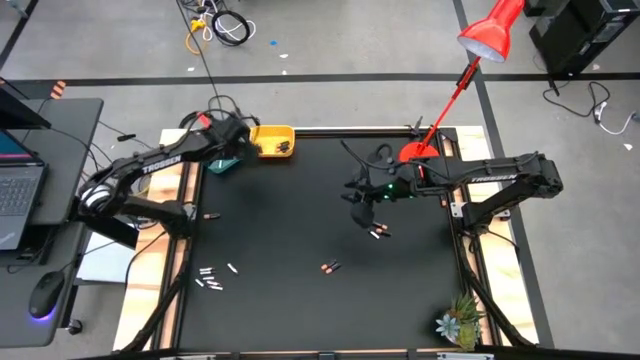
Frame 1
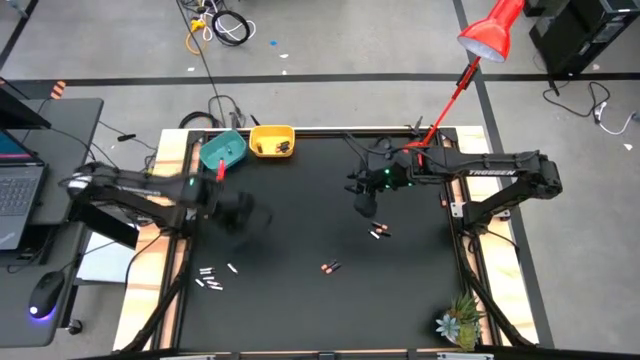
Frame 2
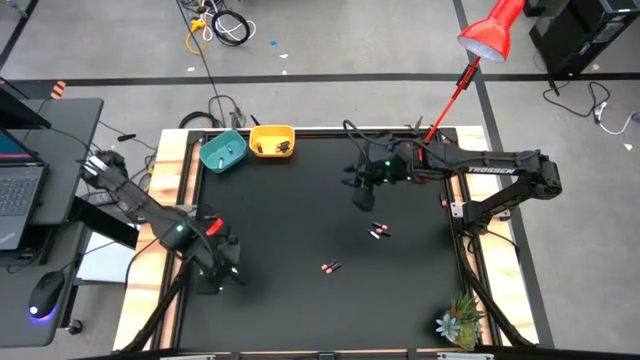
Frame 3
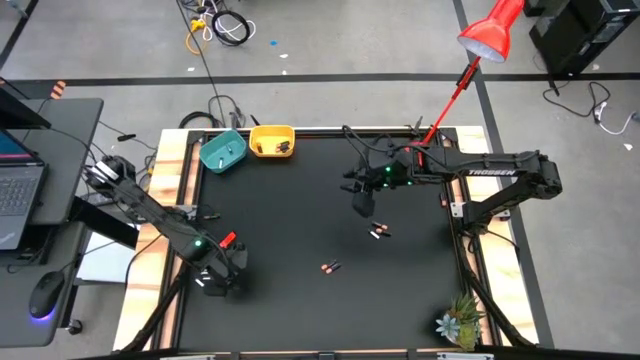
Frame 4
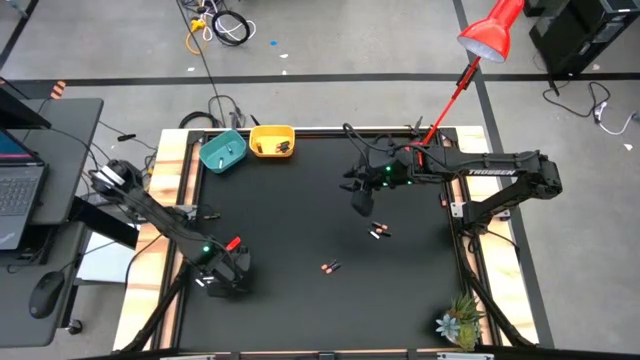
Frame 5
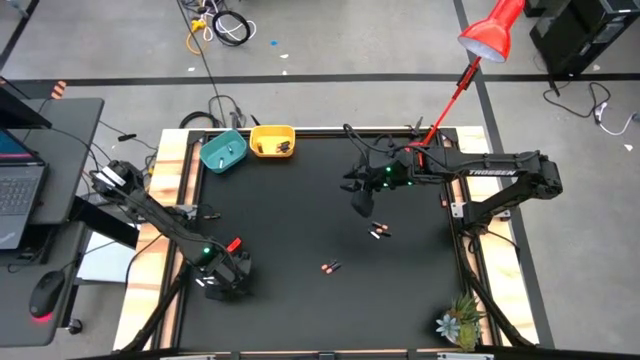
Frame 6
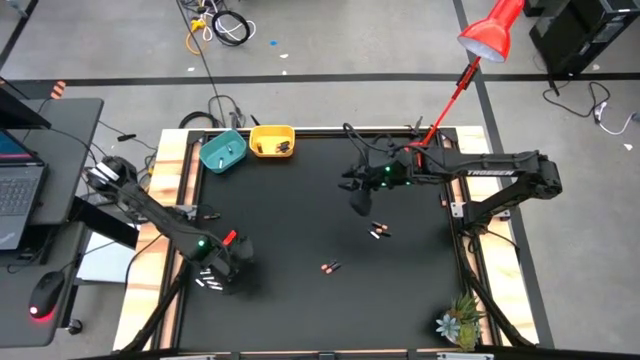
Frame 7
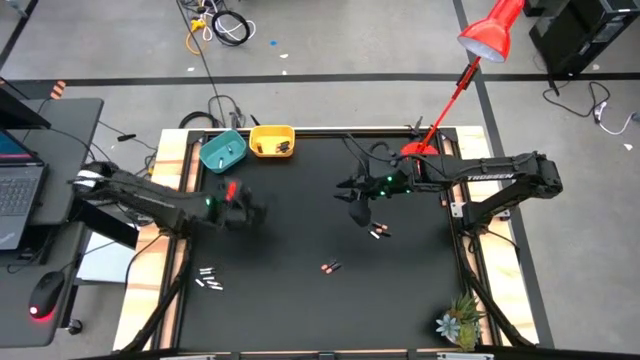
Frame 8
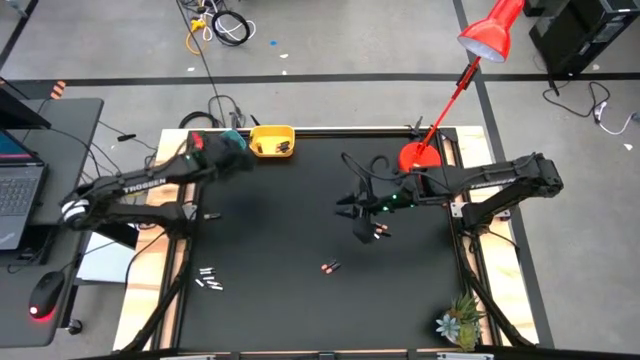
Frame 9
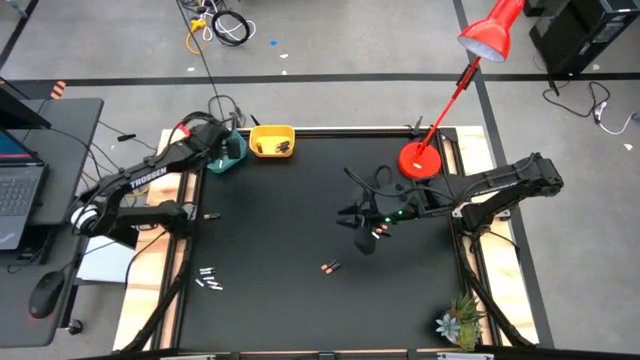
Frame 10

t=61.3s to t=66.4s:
Task: Sort batteries
Put the silver battery into the blue bin

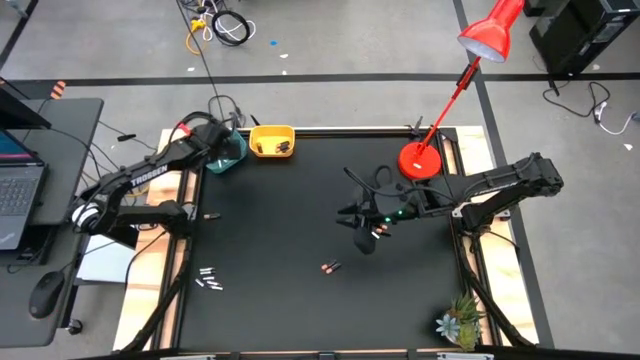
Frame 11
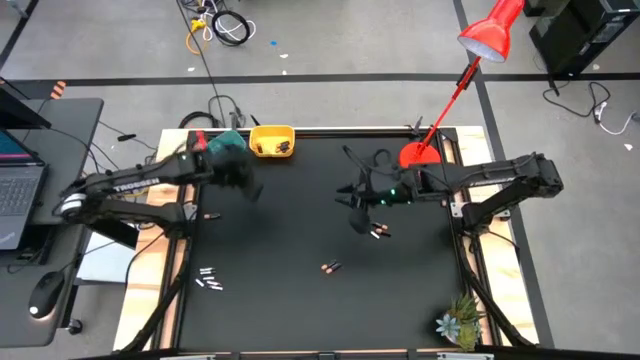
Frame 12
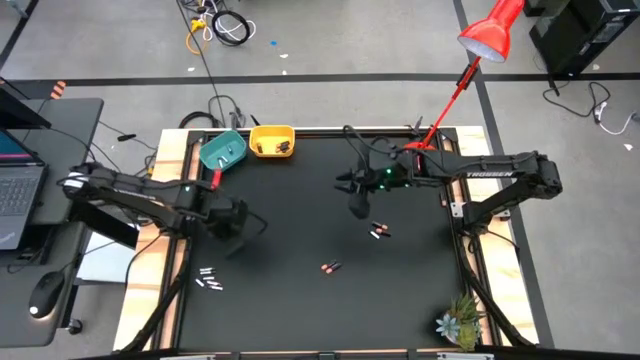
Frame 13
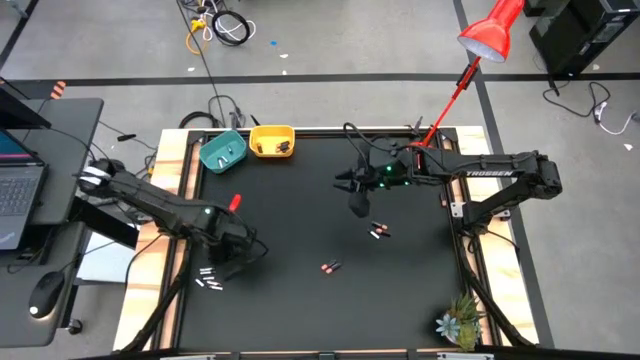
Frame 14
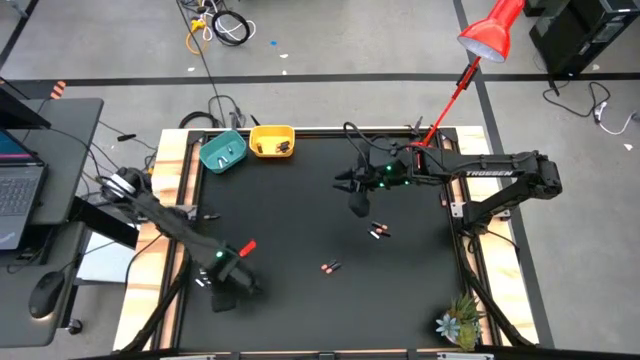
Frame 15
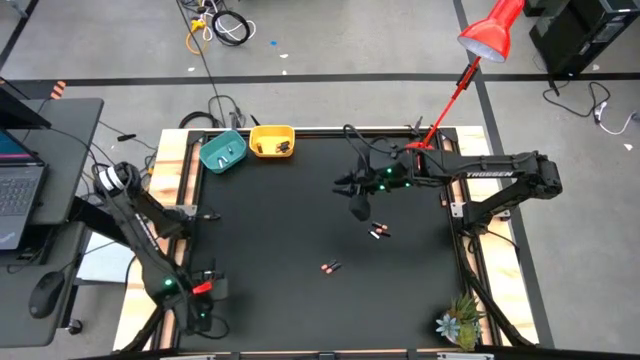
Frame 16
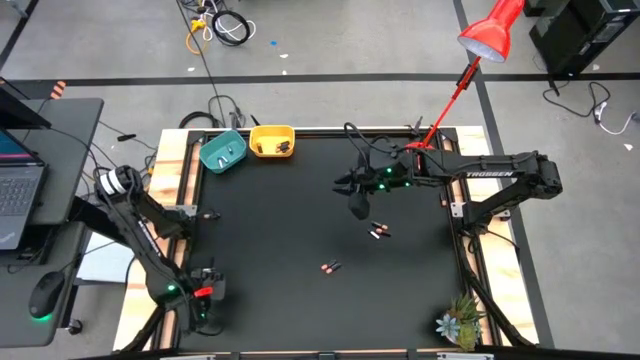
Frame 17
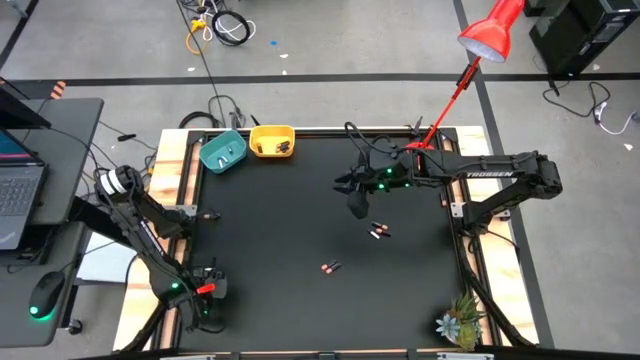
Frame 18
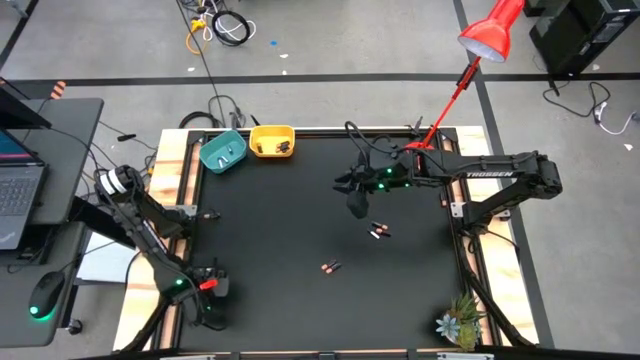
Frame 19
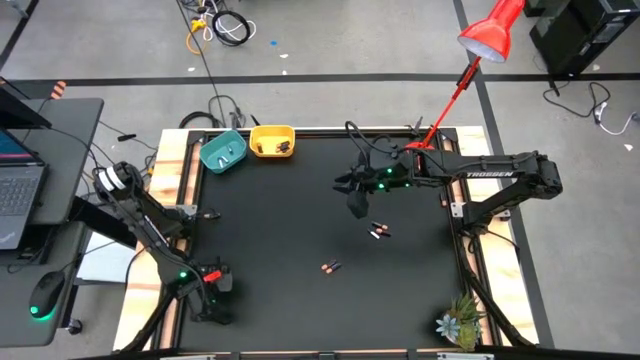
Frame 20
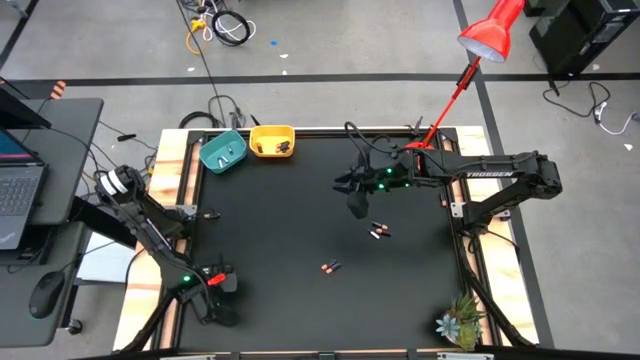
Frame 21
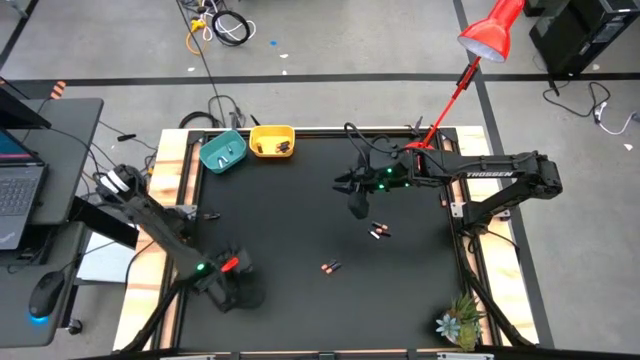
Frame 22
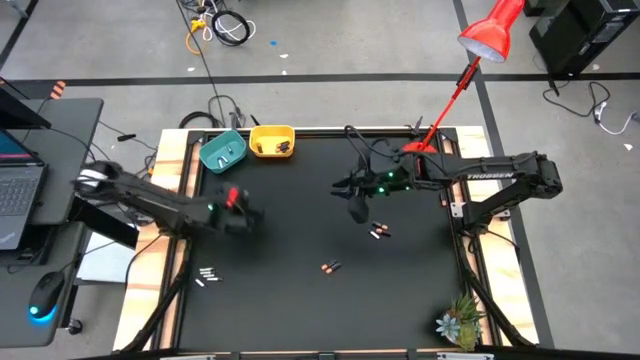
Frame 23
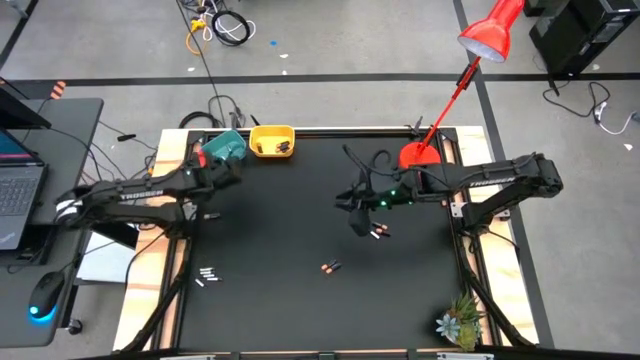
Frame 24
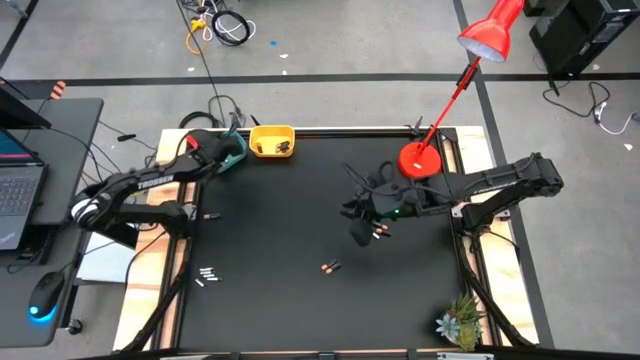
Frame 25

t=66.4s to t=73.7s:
Put the silver battery into the blue bin

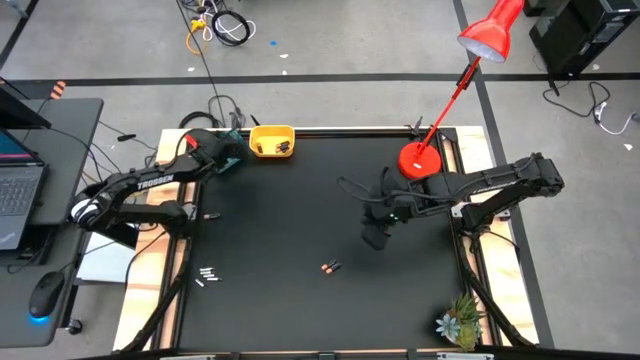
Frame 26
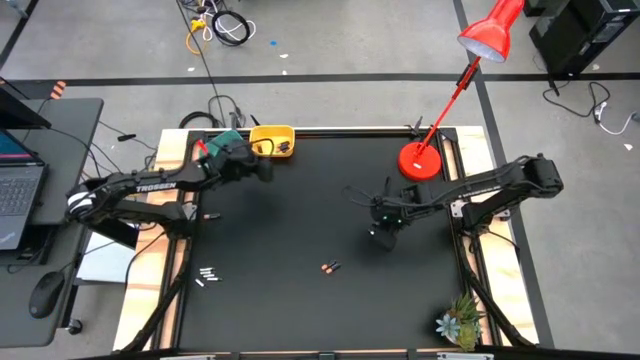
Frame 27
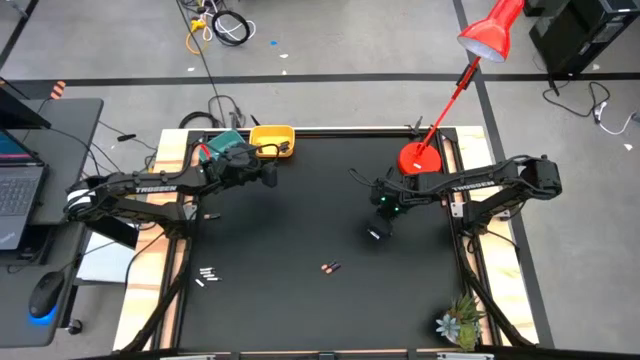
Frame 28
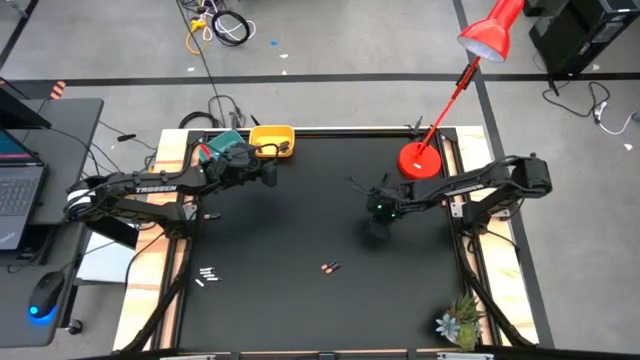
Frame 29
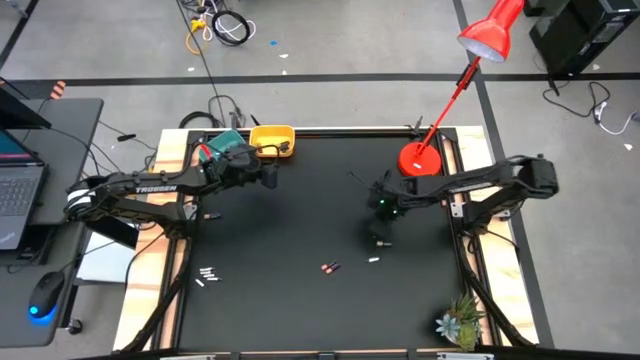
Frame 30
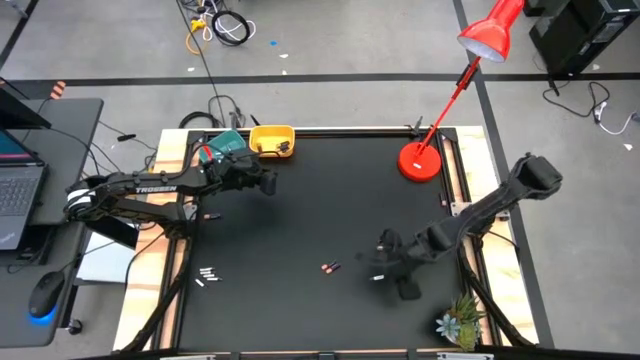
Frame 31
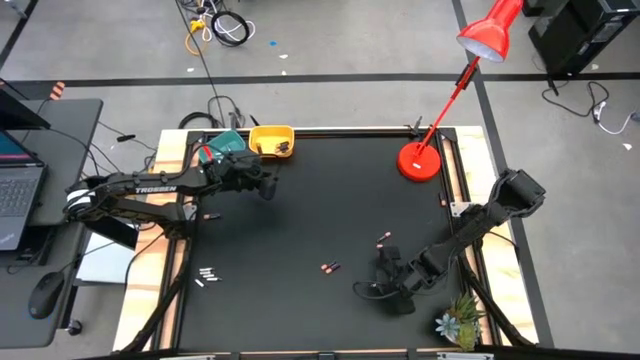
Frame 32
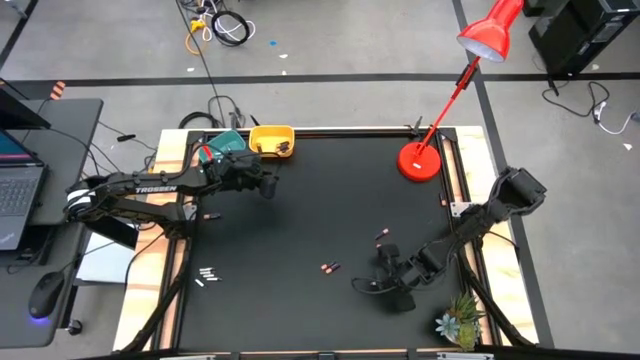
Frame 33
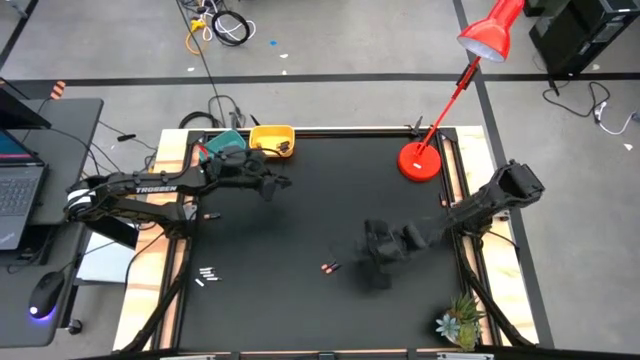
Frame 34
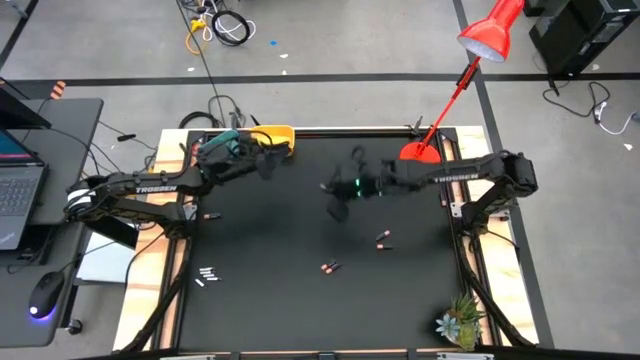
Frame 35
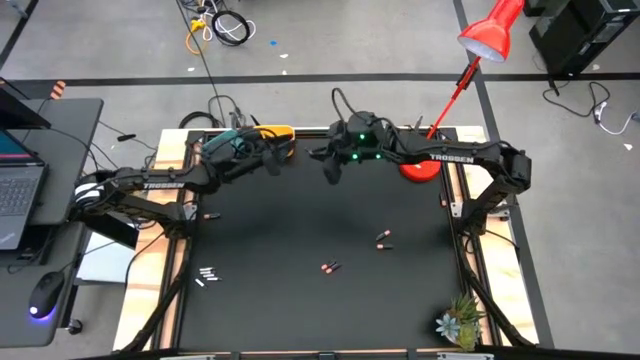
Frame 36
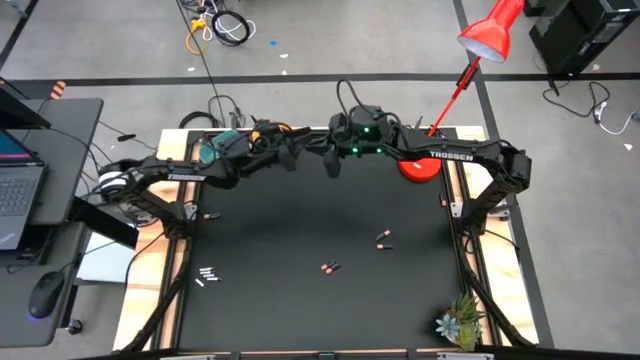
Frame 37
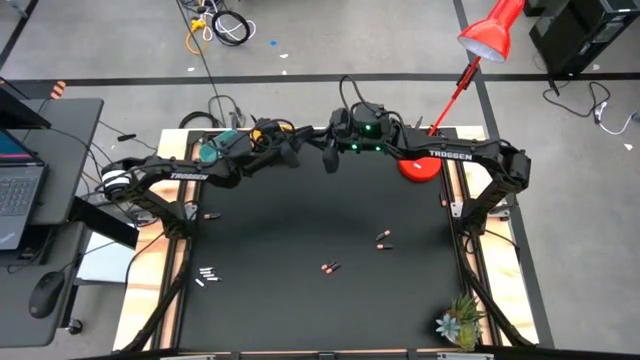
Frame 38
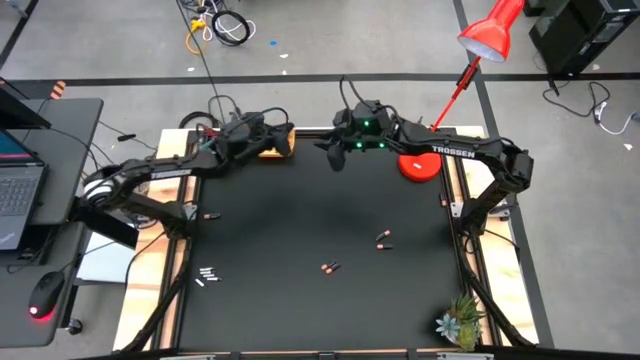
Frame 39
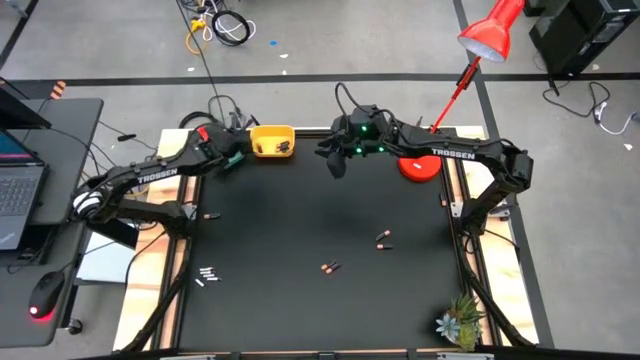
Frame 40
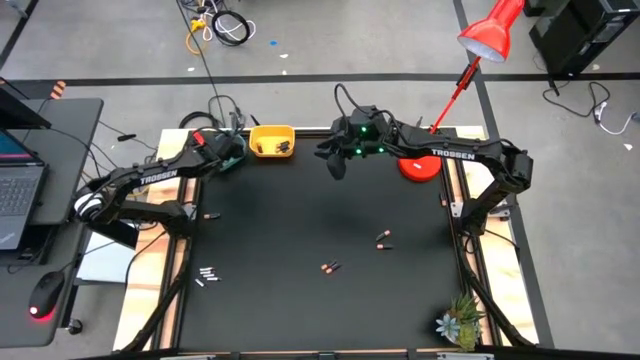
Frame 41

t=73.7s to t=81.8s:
Put the silver battery into the blue bin

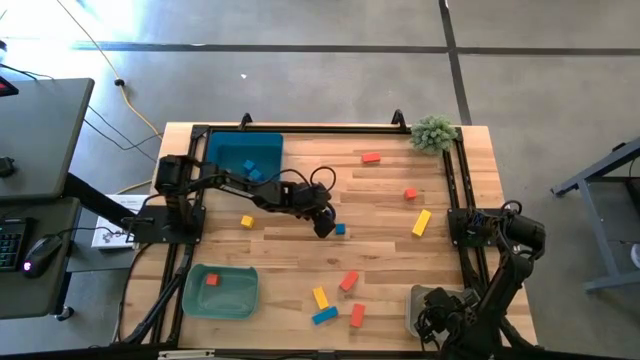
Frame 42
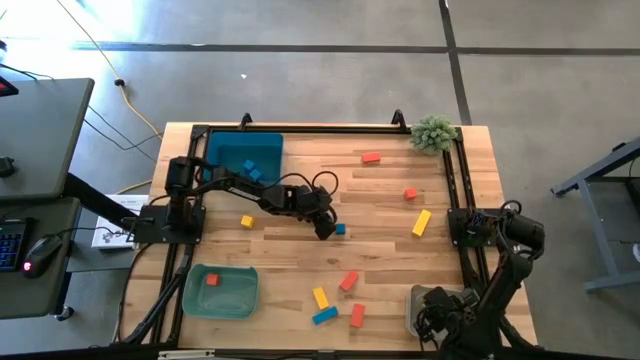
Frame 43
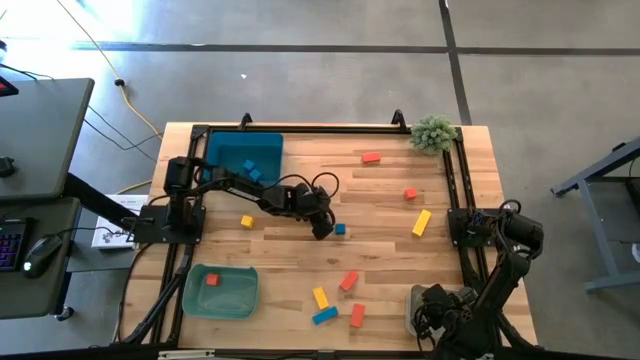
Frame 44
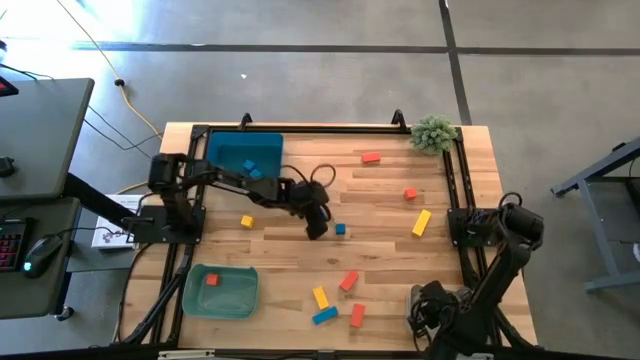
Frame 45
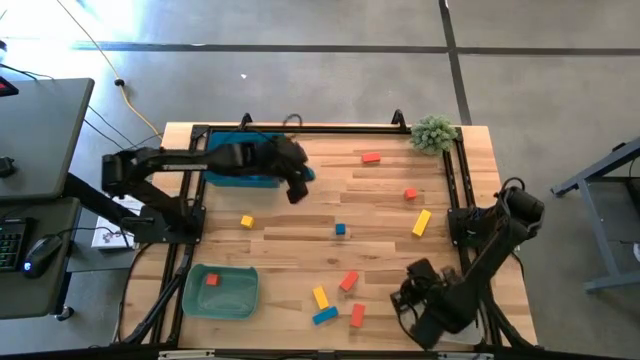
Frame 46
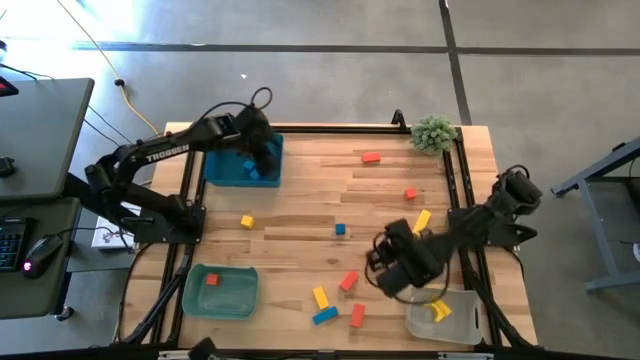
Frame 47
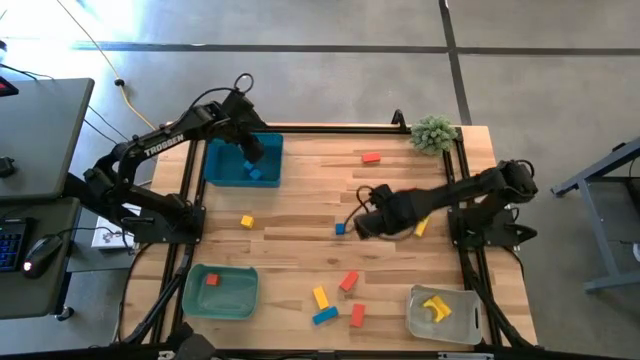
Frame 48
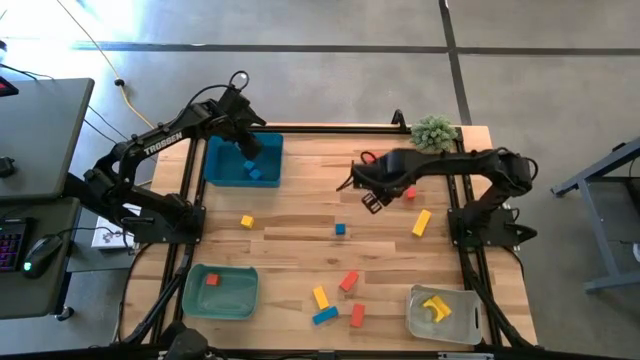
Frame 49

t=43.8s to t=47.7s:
Task: Sort & place blocks by color
Put the blue block into the blue bin
